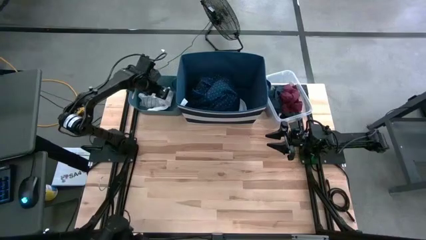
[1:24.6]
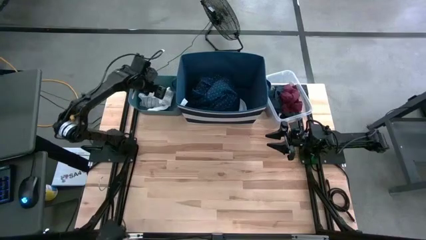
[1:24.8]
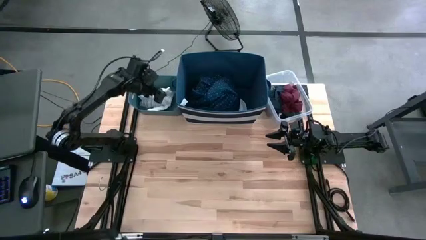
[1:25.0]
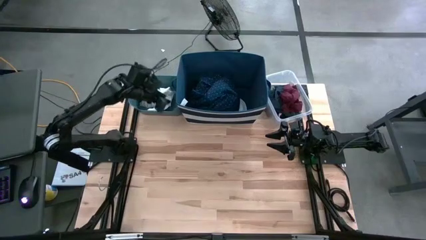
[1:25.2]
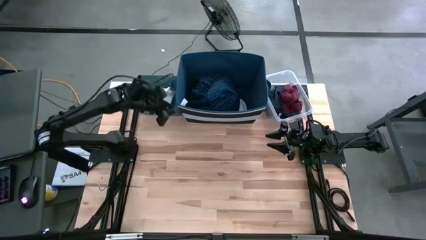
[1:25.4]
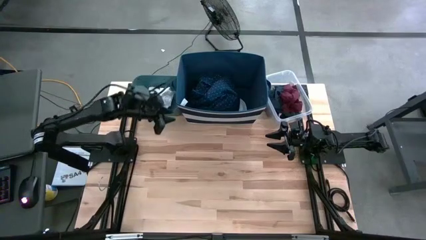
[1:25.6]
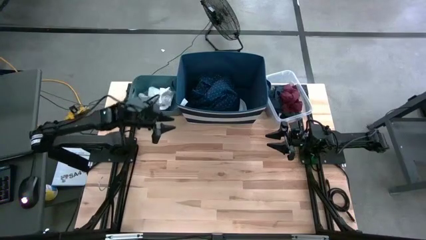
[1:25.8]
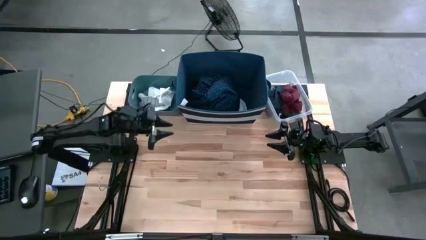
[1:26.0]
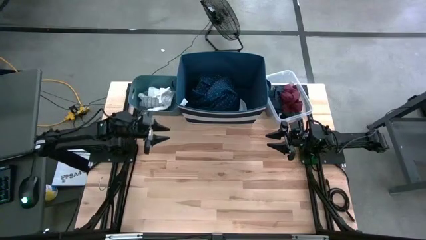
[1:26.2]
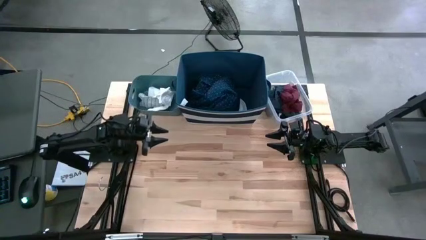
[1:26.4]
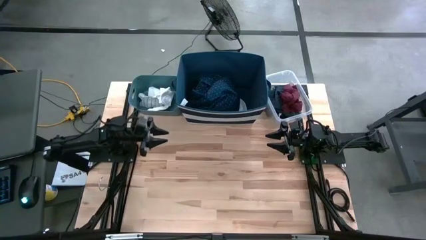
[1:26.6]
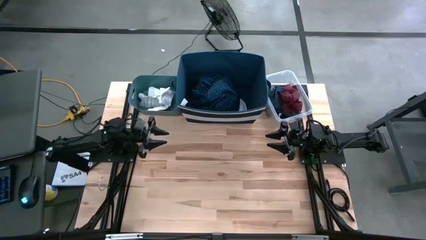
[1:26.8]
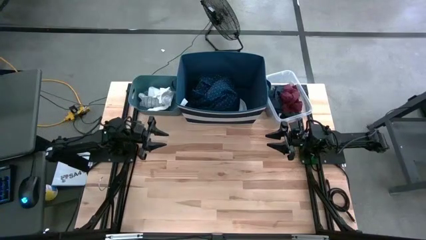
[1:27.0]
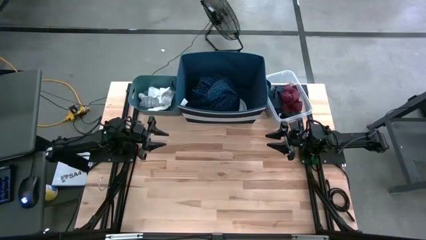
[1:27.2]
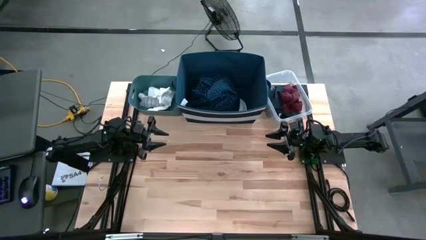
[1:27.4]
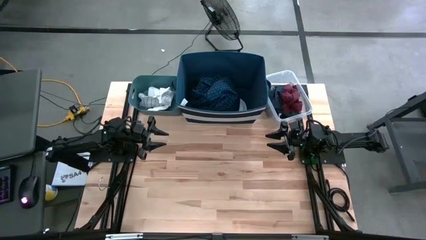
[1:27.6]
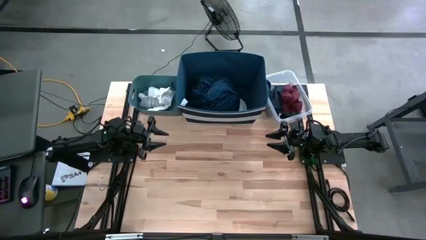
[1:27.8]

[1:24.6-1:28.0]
Task: Pick & Place Cloths
Return to Home Position

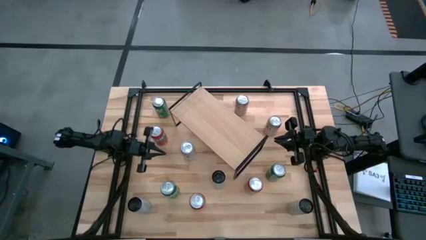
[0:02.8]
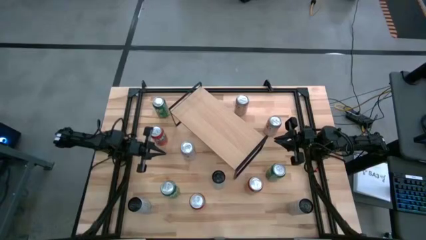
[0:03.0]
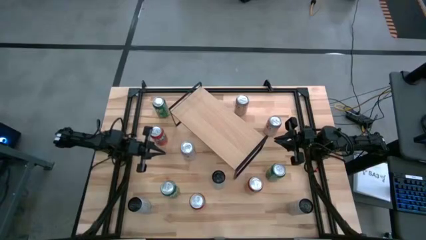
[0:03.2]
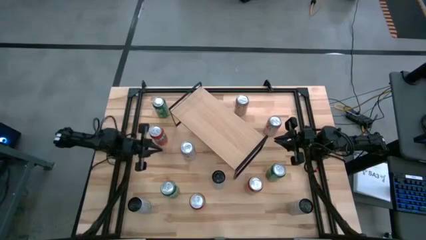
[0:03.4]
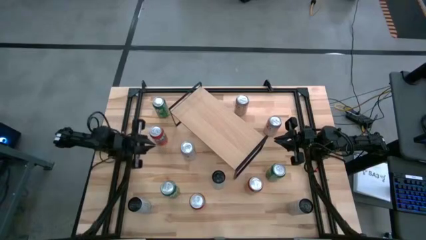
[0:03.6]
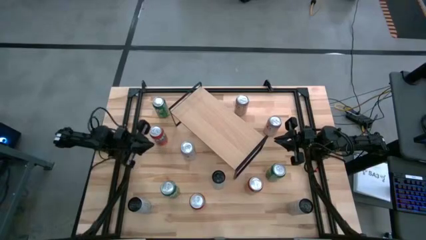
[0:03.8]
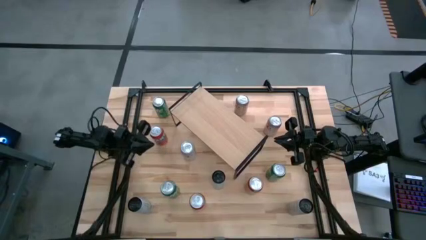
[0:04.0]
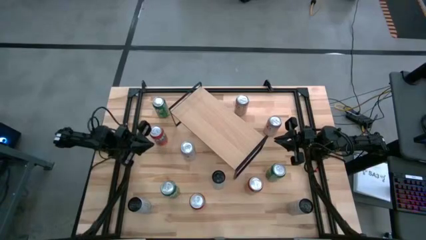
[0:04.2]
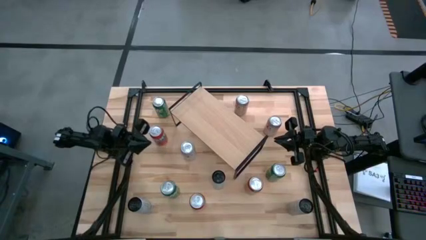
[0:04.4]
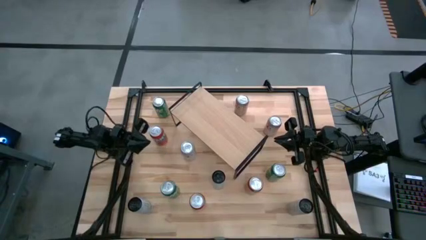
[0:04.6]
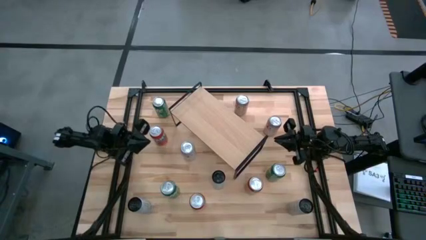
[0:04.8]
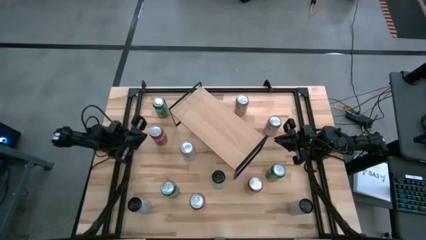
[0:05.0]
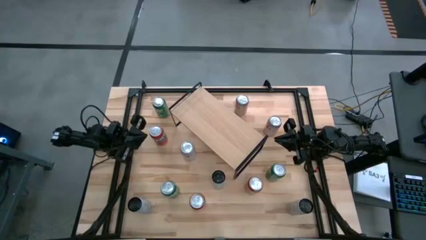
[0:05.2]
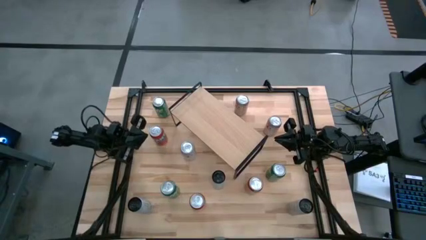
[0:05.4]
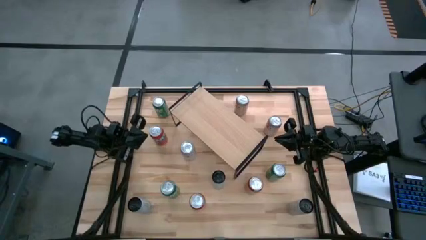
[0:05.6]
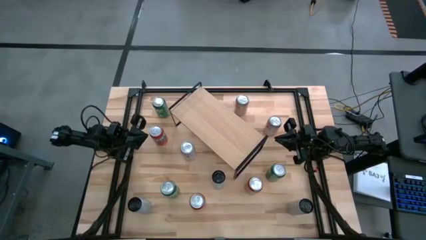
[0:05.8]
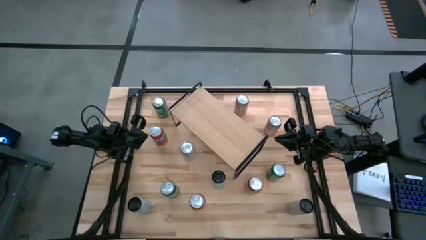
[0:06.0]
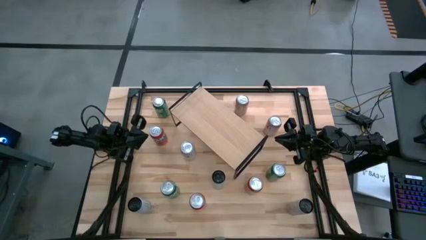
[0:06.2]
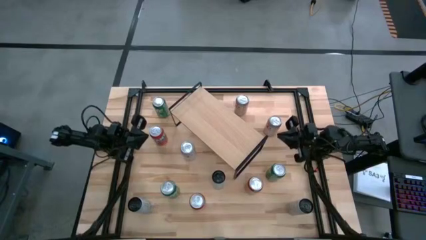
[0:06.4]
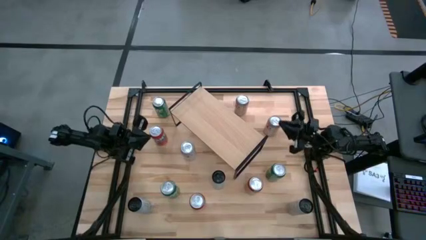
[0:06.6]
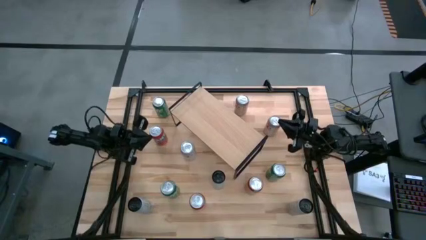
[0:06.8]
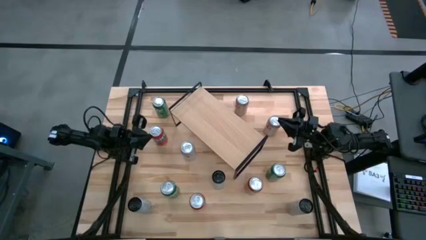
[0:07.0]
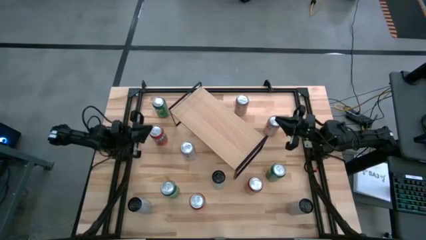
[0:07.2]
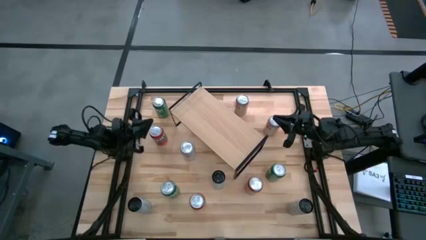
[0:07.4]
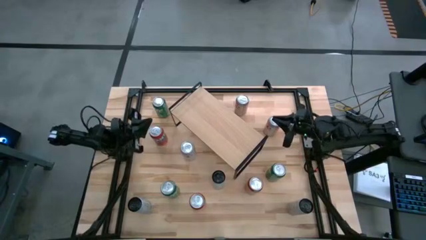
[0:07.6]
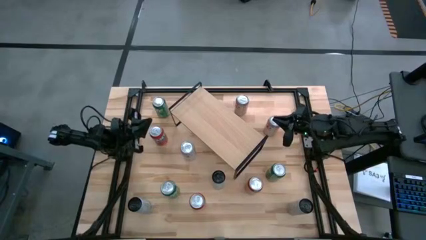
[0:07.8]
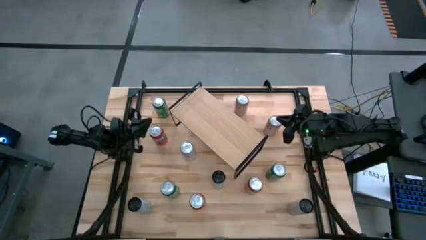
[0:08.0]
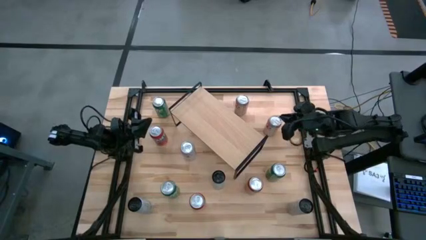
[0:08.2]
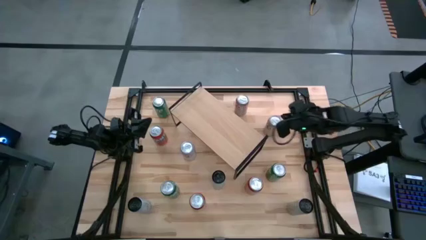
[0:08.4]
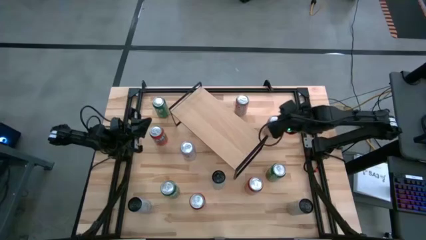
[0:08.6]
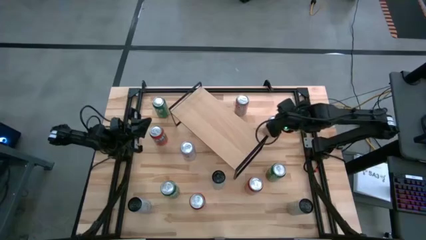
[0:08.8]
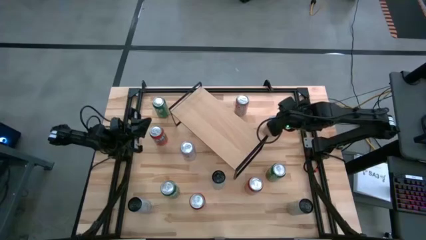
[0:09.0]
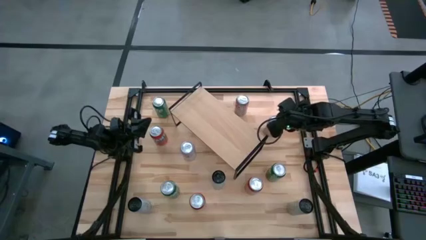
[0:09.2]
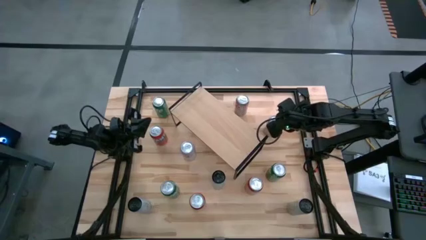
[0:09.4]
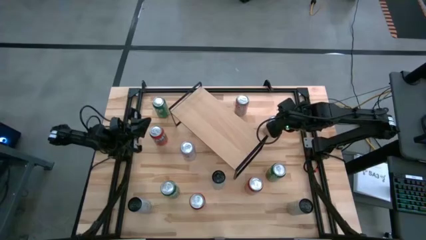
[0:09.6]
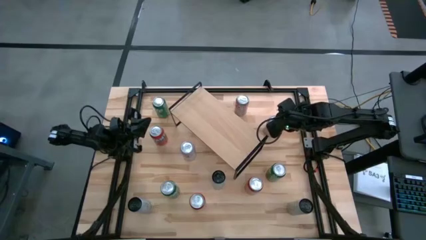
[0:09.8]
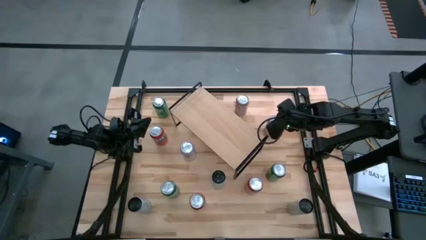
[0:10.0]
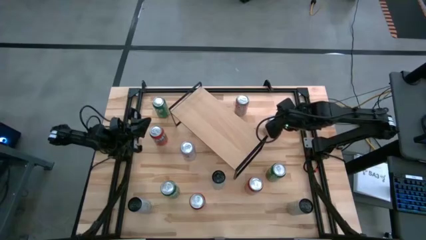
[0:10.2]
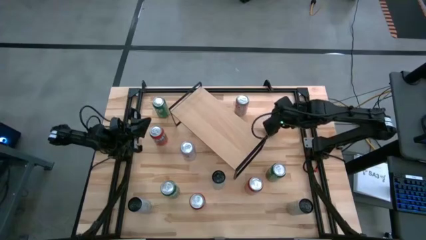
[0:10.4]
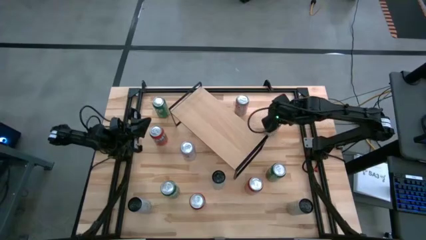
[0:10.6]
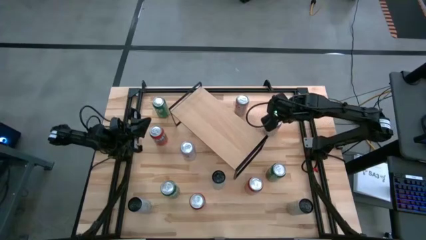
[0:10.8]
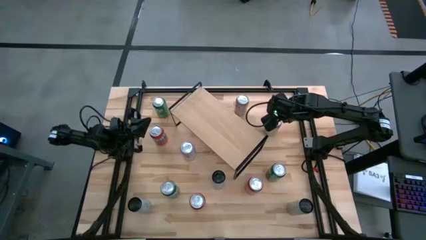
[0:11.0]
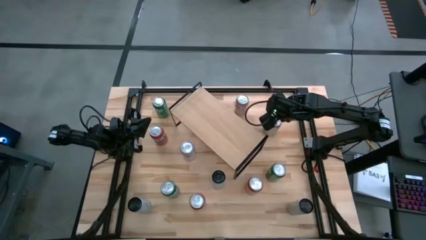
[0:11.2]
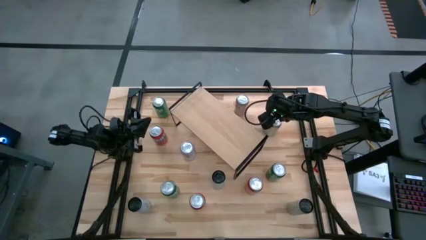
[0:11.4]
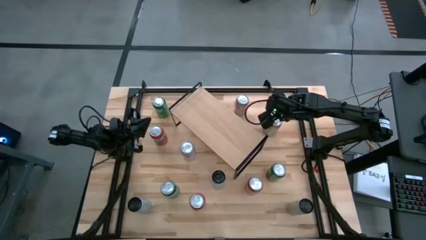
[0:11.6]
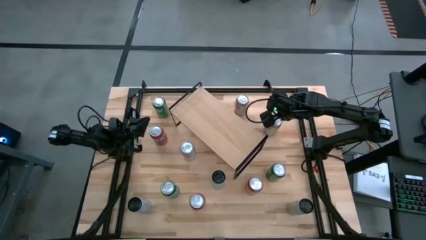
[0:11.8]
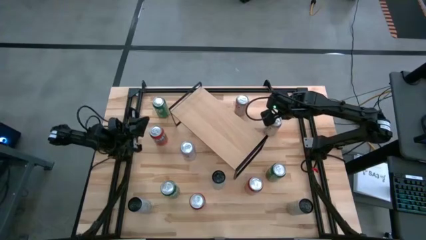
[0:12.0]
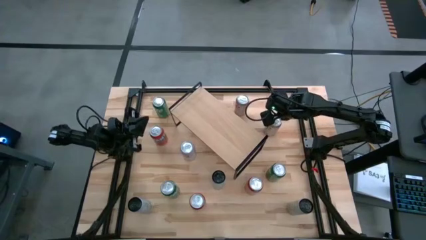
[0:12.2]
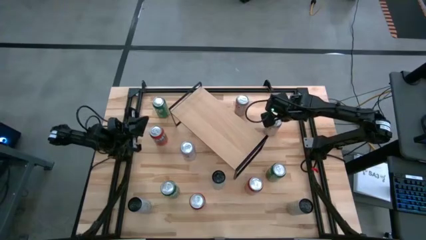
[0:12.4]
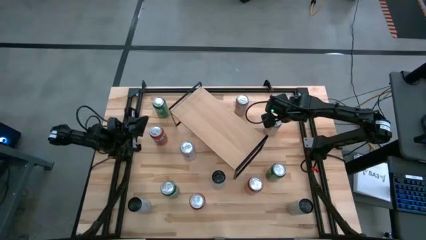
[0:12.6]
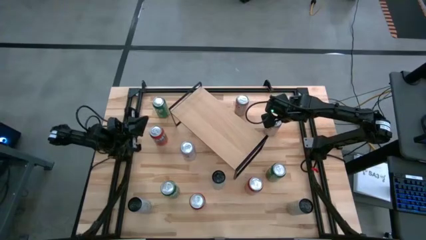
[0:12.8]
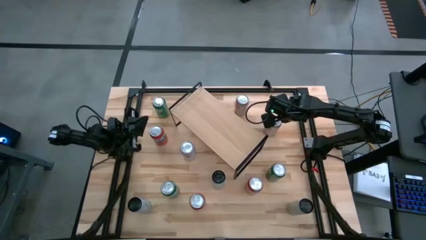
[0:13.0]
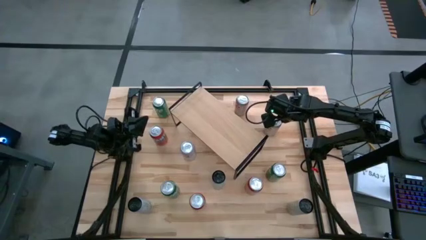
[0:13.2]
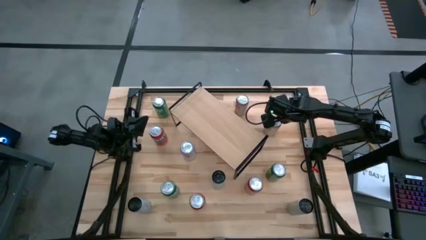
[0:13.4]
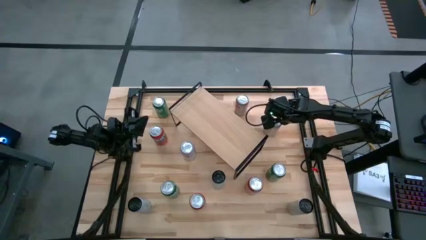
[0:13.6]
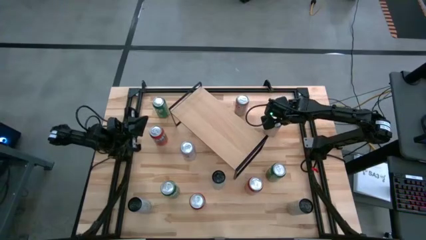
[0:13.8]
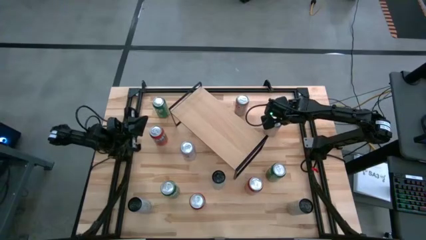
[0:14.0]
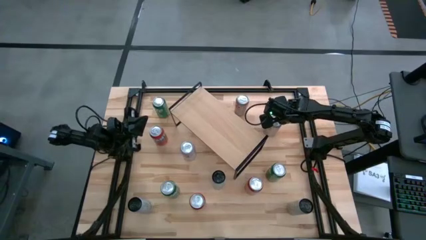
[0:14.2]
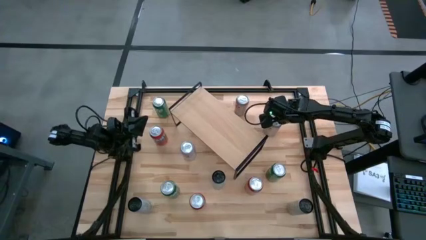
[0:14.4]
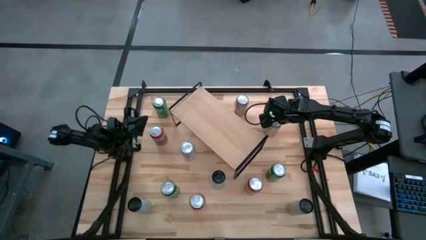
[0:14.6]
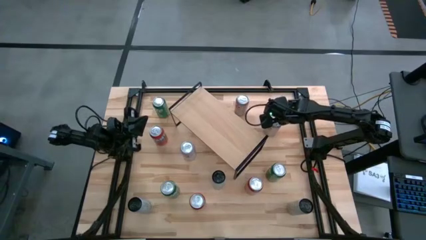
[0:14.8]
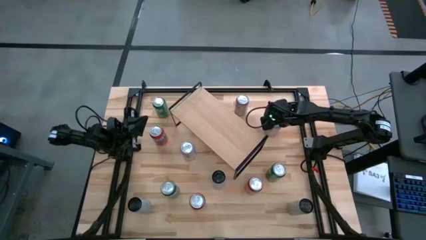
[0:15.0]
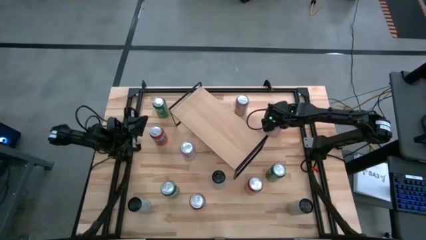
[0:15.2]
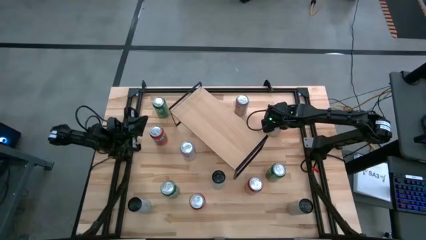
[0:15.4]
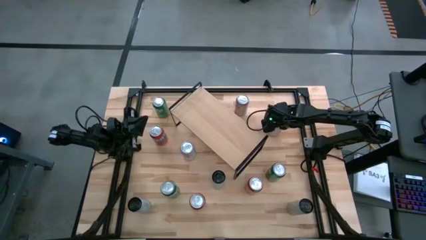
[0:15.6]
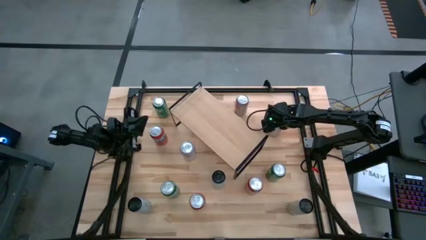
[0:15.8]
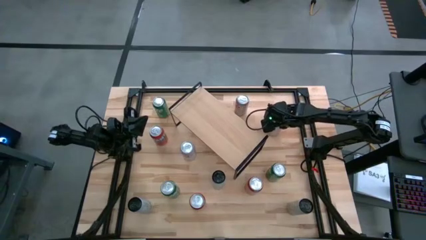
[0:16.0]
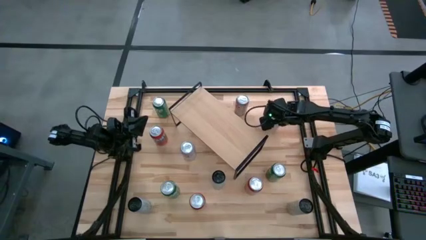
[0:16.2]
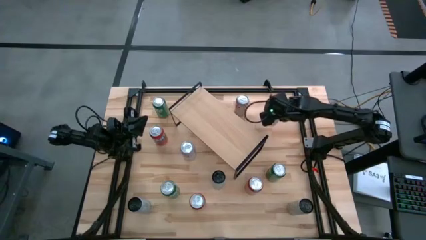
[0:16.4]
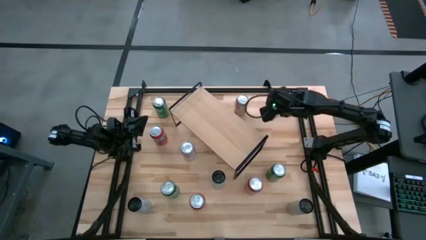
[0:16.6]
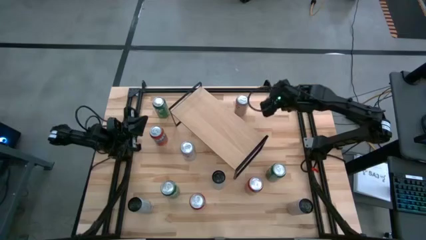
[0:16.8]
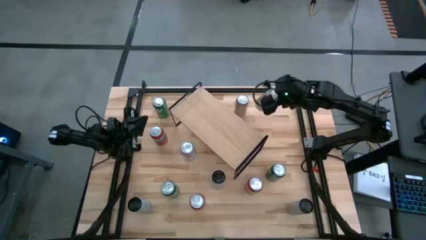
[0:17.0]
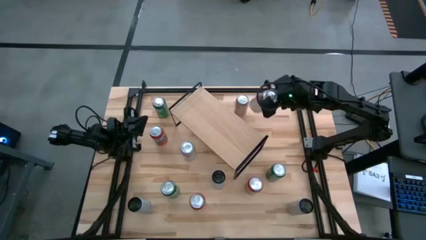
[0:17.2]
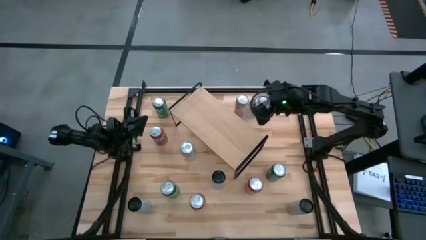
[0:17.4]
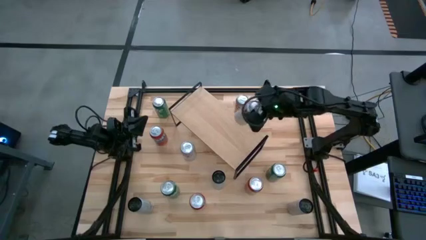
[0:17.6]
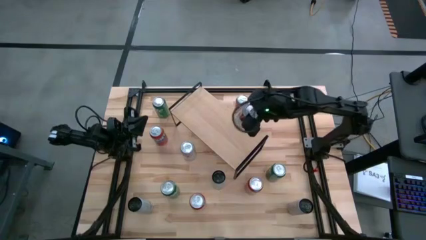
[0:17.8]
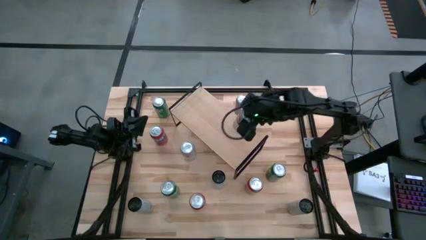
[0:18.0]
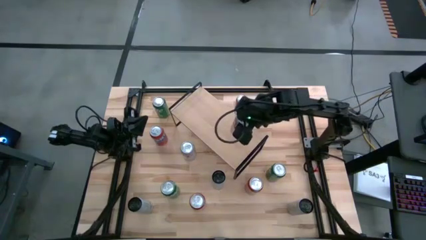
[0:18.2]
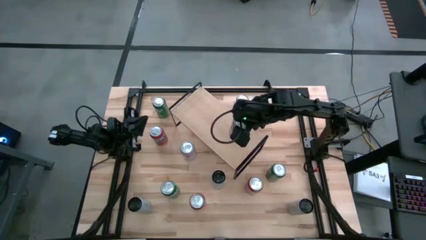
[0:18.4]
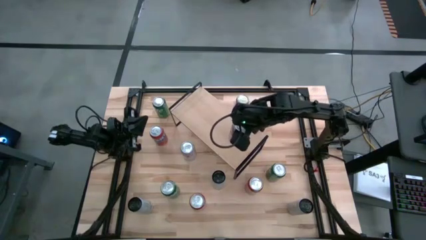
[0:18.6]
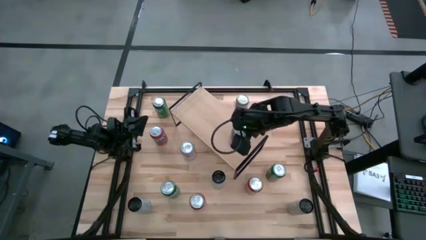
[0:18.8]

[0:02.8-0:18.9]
Task: Place canned beverage on shelf
Put the middle right silver soda can on the shelf
